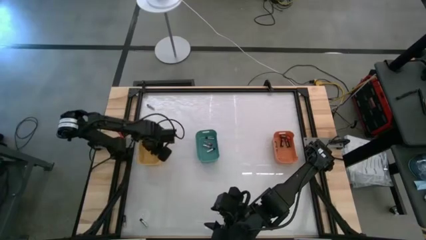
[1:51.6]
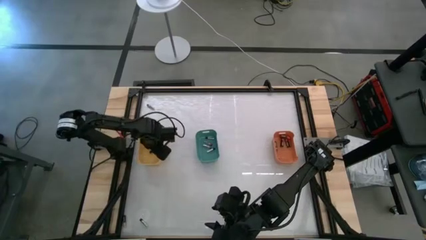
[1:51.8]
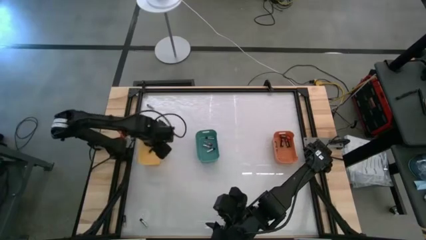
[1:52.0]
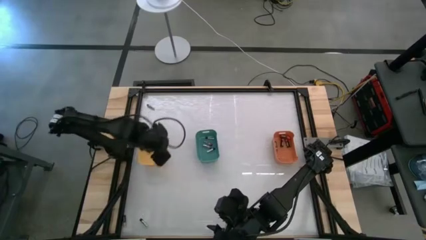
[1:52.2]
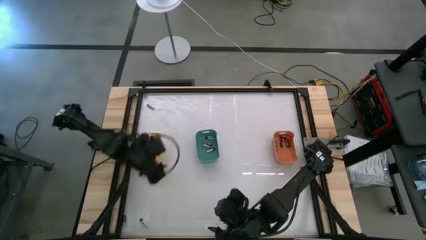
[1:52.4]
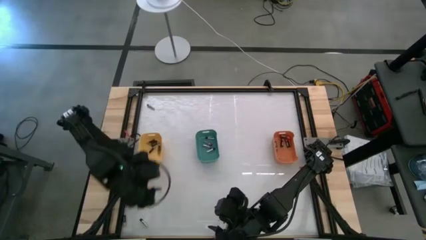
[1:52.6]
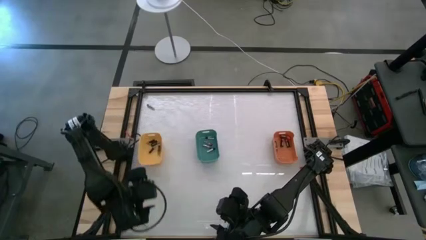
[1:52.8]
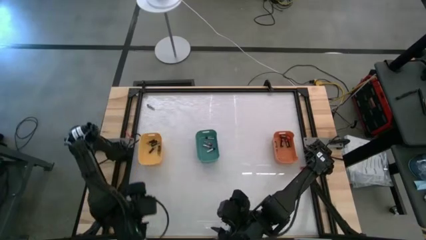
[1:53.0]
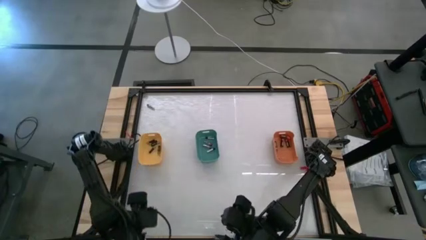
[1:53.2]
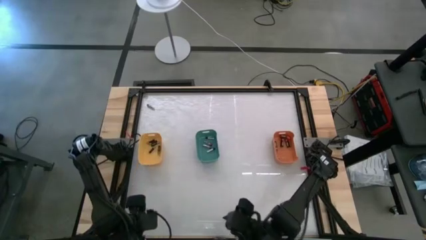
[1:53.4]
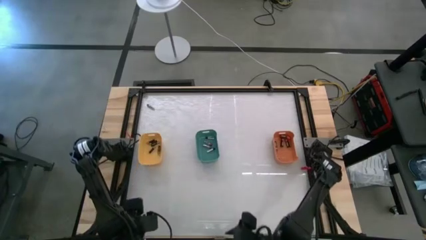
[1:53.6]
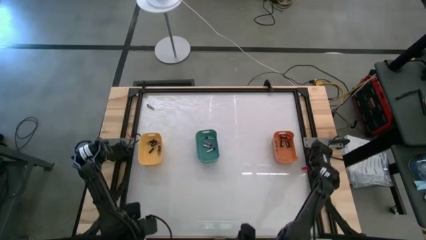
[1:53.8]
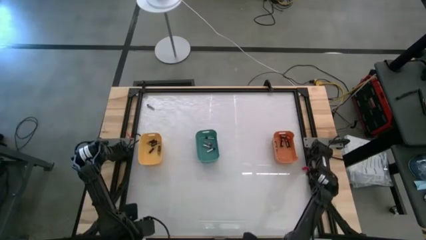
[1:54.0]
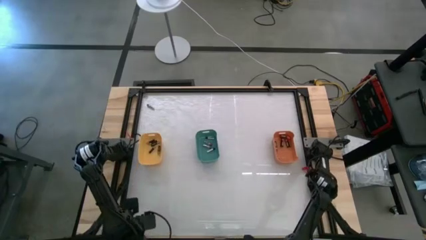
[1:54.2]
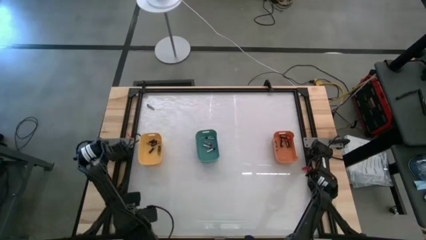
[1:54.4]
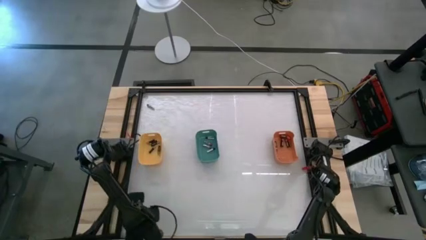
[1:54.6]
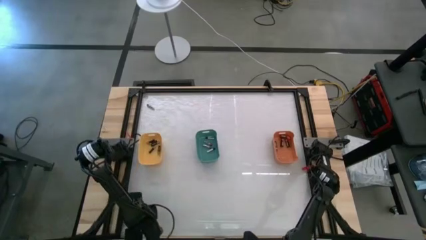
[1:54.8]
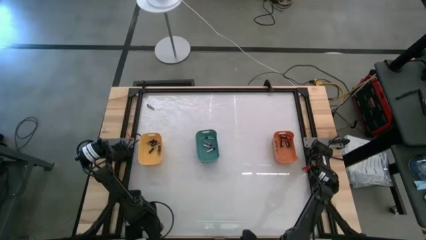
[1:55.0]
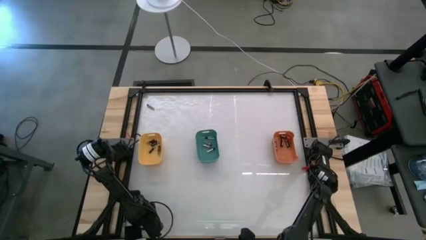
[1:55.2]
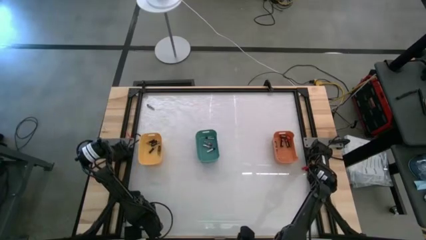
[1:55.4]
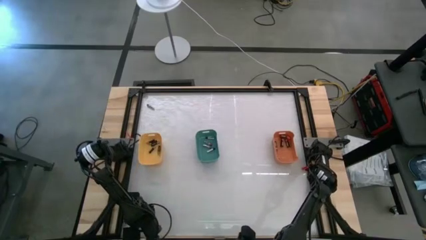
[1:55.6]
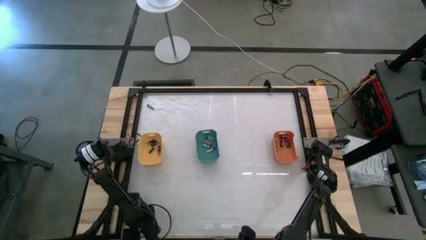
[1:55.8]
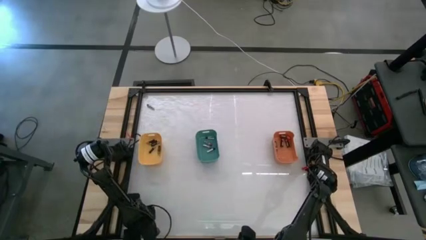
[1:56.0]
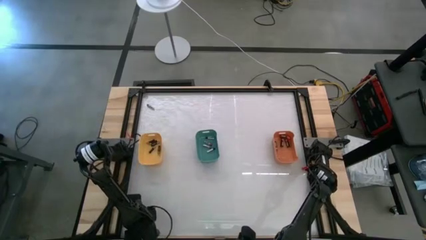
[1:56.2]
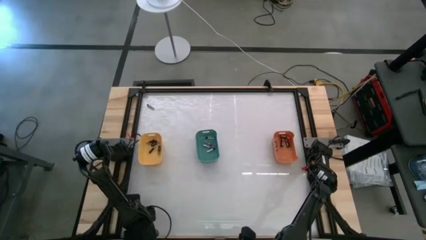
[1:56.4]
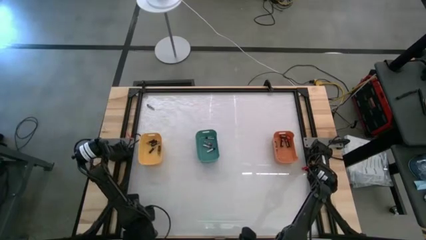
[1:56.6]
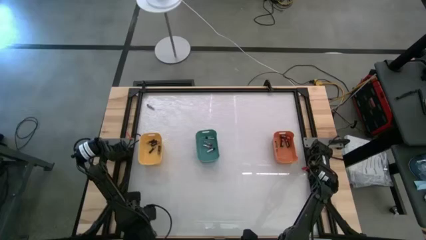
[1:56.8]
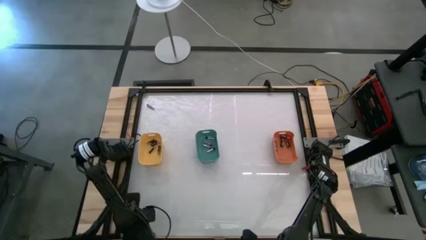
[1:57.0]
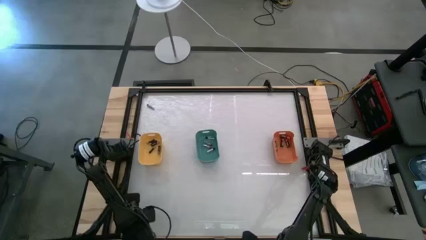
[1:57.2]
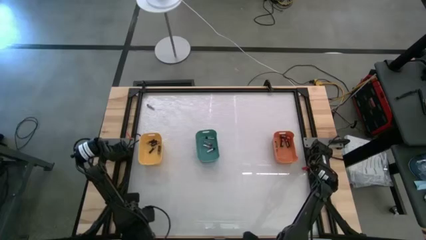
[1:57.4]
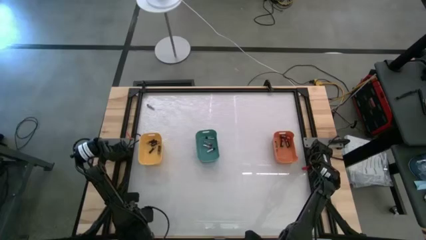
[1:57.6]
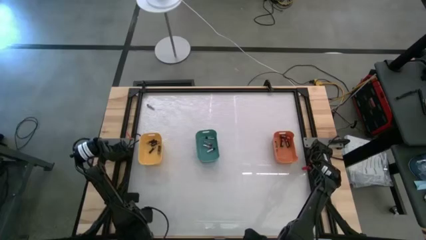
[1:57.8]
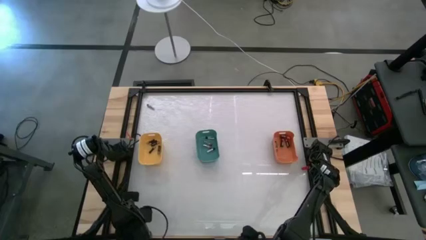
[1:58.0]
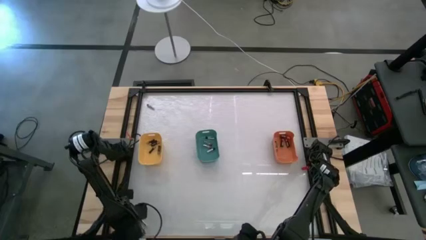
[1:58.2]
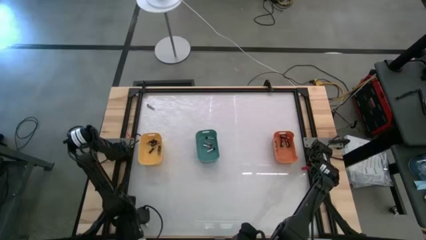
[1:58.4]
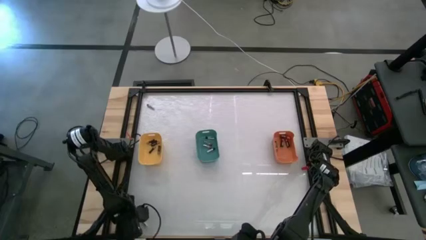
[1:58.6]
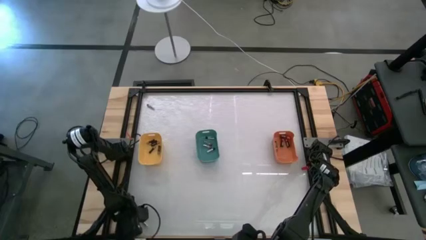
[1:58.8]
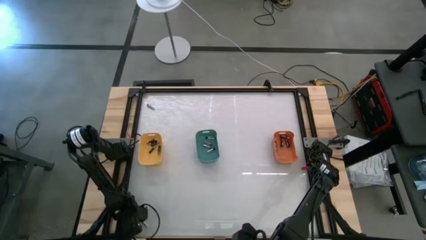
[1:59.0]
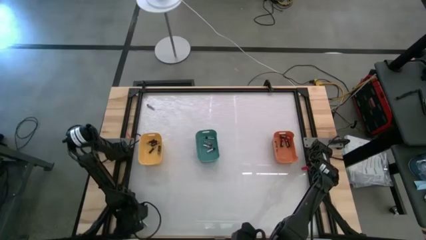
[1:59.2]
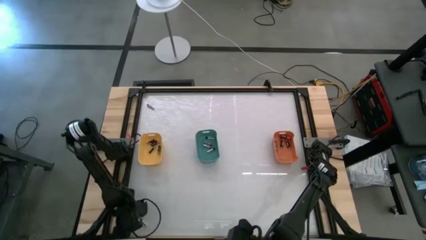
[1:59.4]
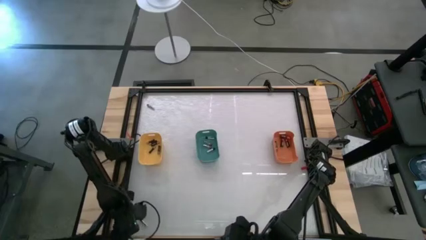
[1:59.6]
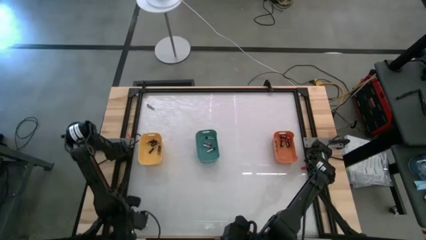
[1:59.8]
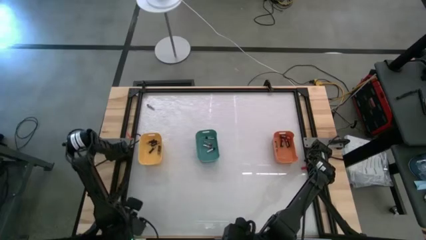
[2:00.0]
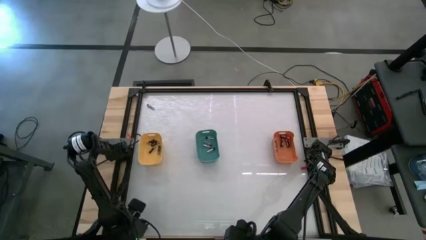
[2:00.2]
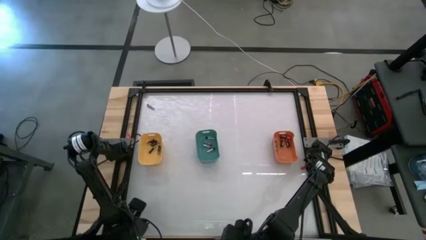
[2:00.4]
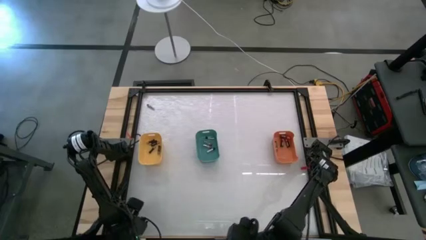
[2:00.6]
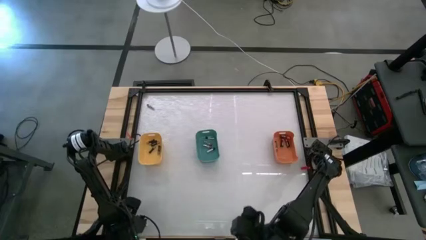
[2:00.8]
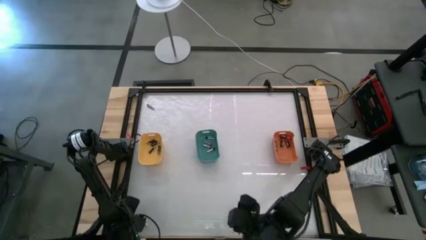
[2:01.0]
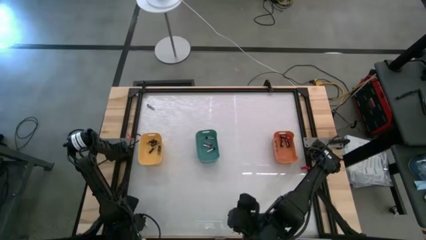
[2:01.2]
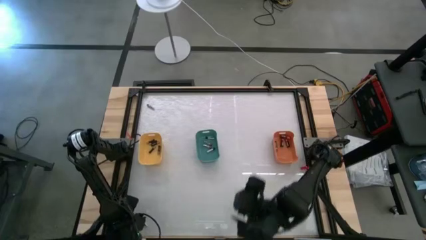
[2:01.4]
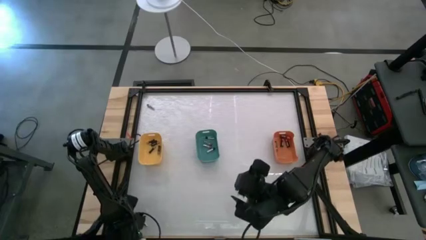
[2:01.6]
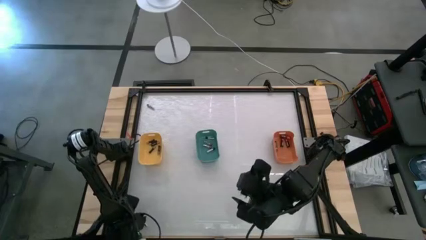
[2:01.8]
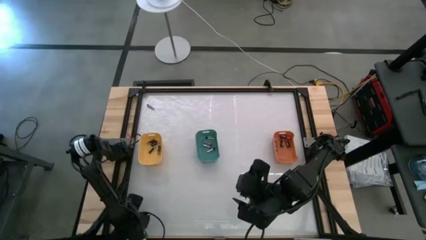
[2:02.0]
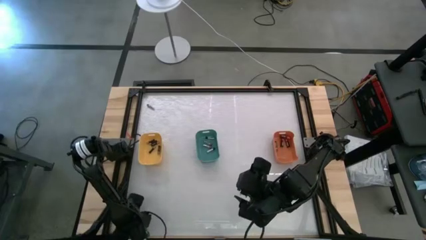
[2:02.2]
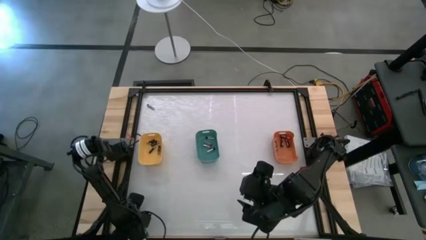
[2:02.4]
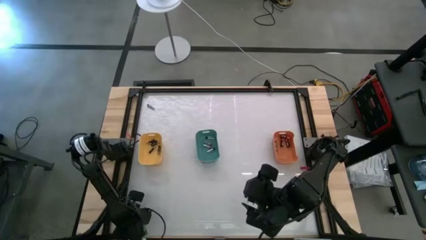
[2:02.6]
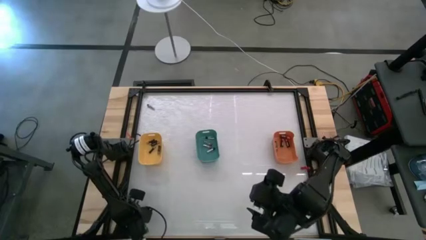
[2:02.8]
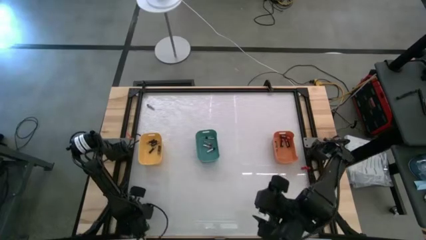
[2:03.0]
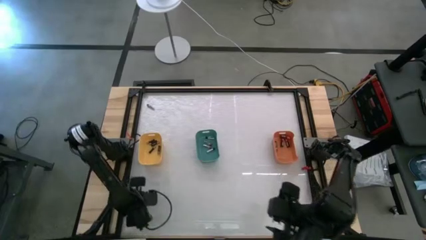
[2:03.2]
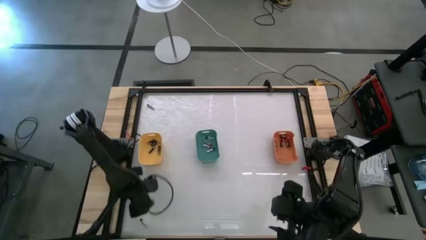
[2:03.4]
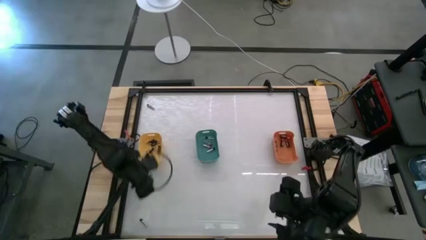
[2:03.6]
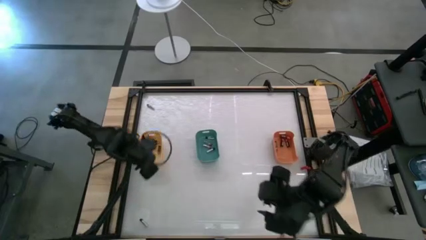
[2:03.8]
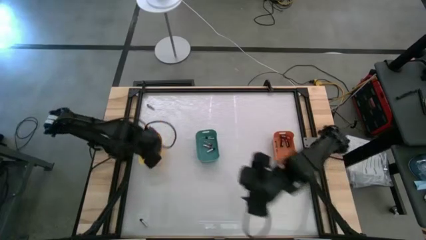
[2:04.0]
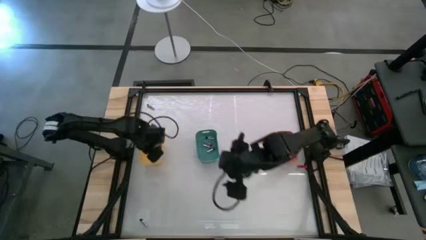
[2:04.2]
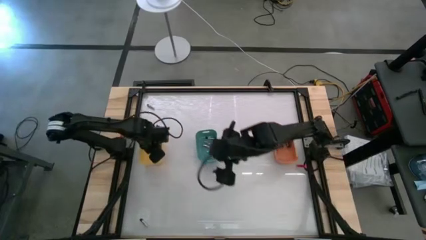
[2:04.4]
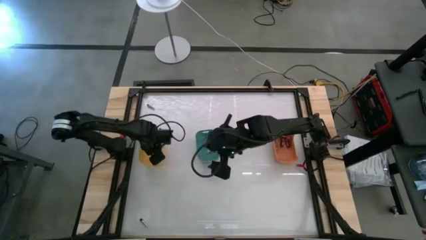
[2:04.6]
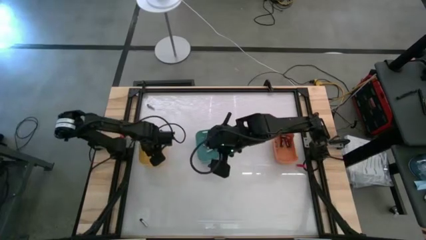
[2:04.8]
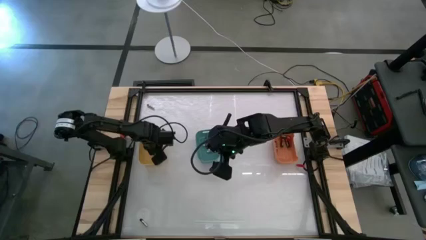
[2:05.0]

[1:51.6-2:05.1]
Task: Sort batteries
Put the black battery into the yellow bin

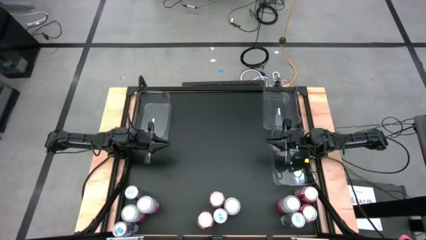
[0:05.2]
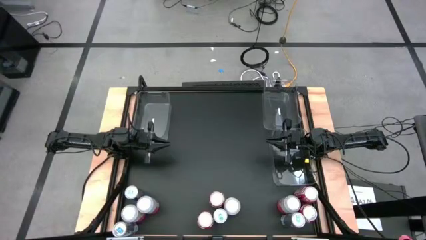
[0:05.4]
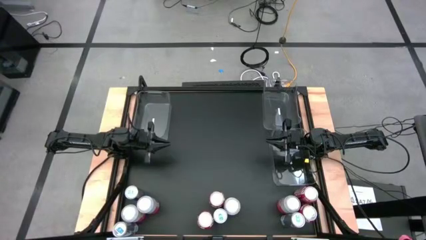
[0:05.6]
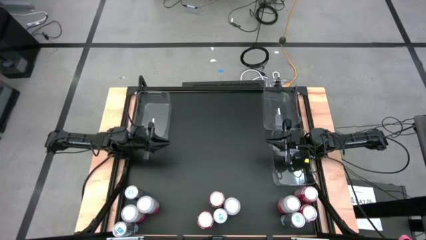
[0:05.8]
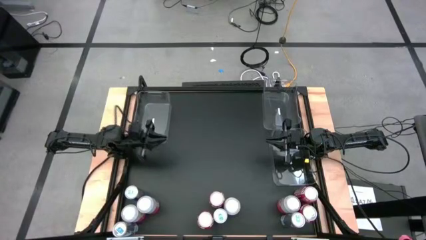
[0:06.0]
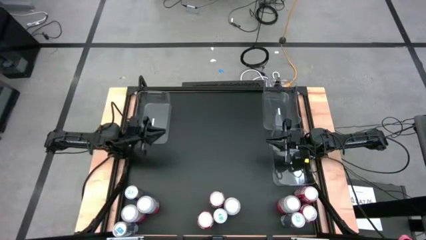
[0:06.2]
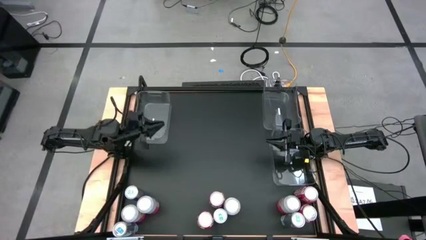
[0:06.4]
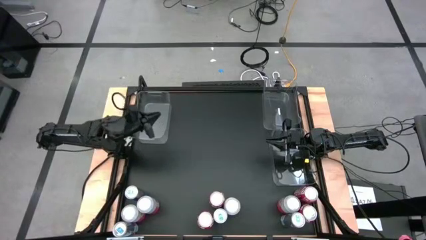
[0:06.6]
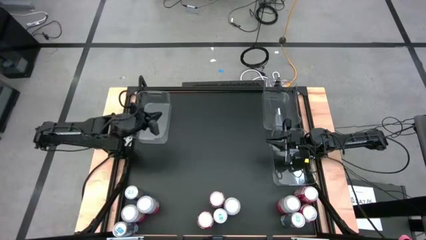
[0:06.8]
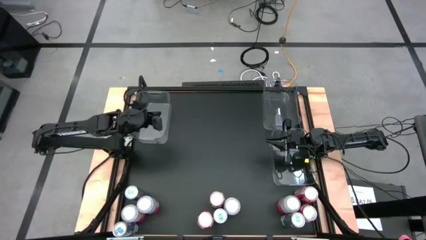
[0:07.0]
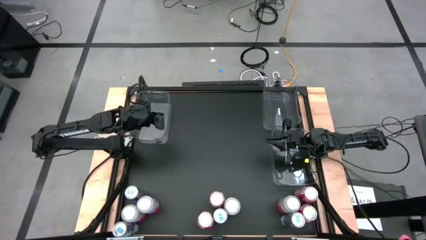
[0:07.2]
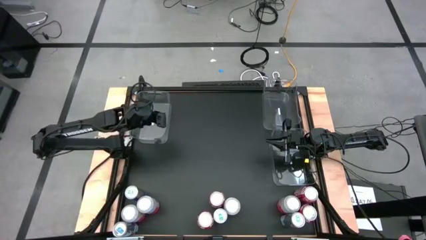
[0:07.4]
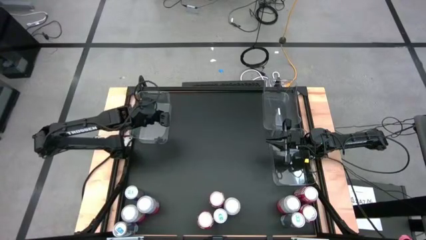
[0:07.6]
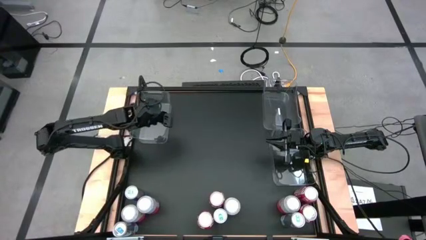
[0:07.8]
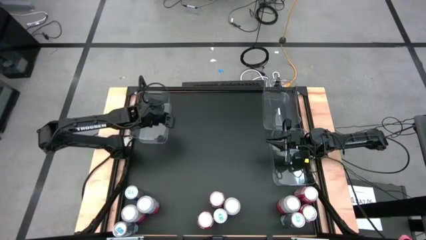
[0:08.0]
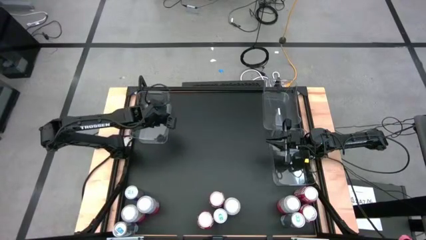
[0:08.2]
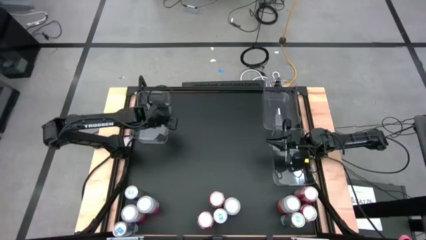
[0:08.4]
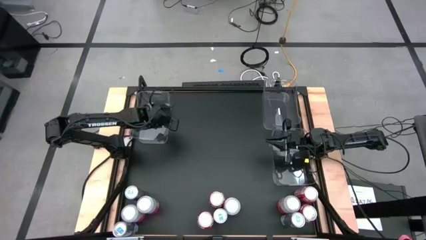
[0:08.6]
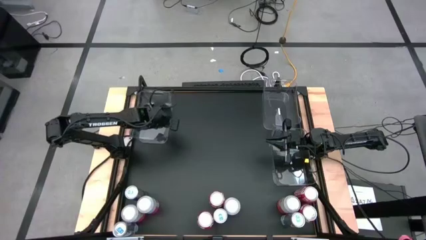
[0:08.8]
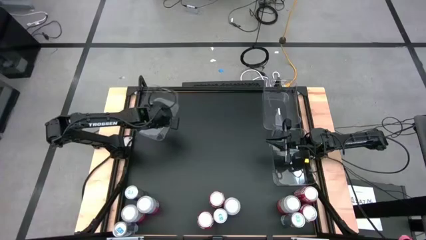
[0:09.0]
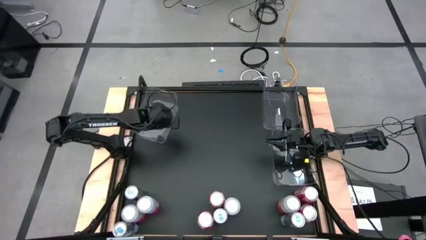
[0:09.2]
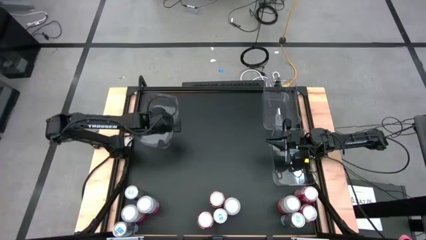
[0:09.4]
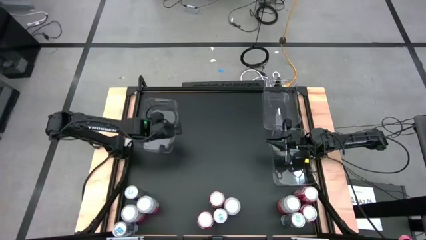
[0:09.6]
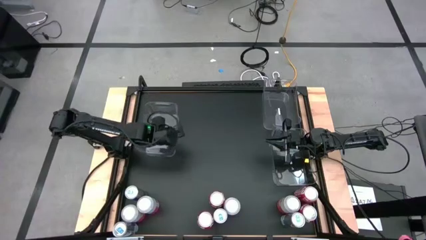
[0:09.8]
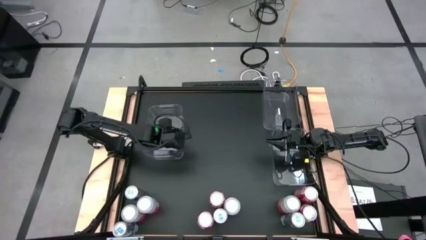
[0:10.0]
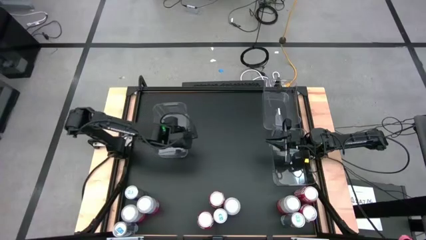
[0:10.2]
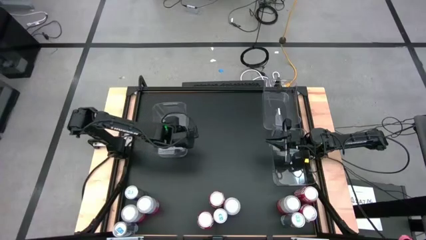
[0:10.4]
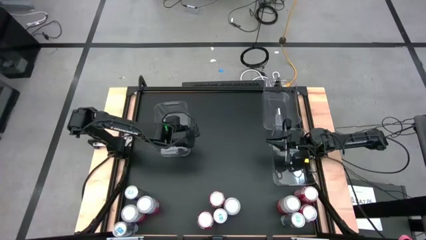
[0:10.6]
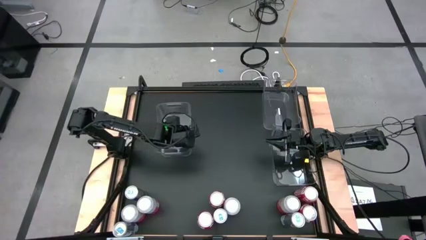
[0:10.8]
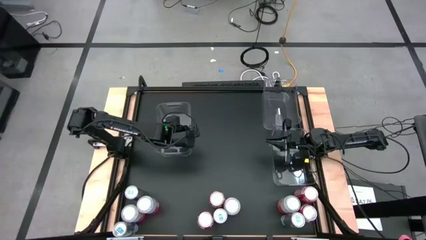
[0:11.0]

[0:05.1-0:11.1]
Task: Sort soda cans
Adjust the top left transparent bin
